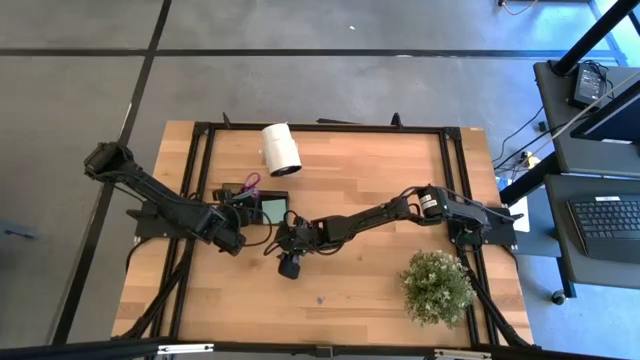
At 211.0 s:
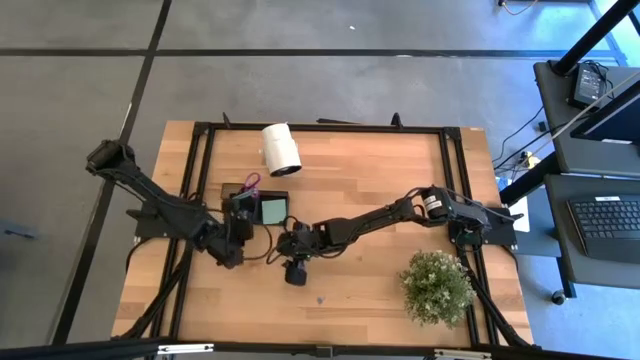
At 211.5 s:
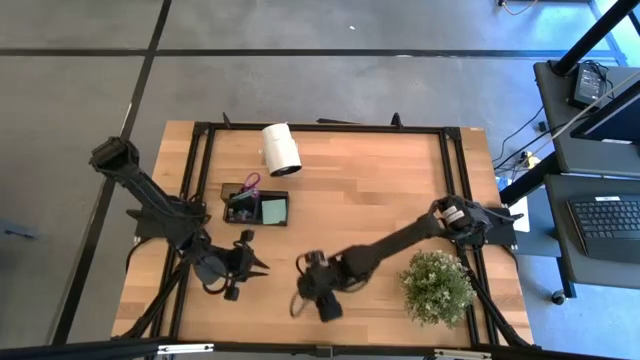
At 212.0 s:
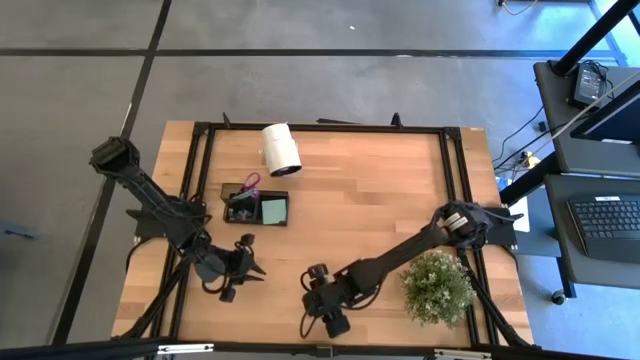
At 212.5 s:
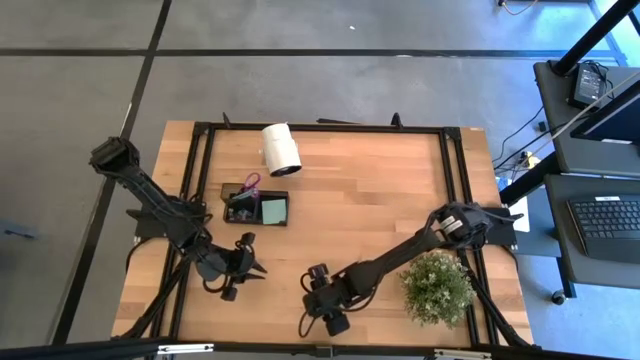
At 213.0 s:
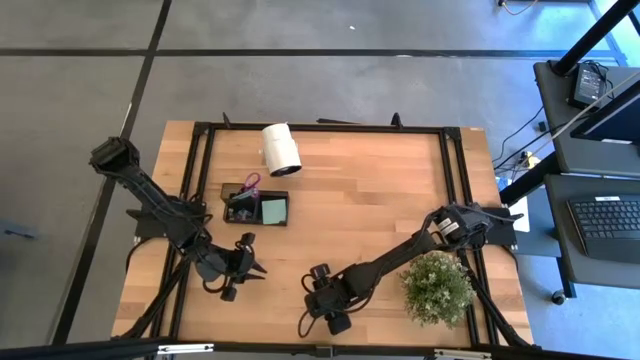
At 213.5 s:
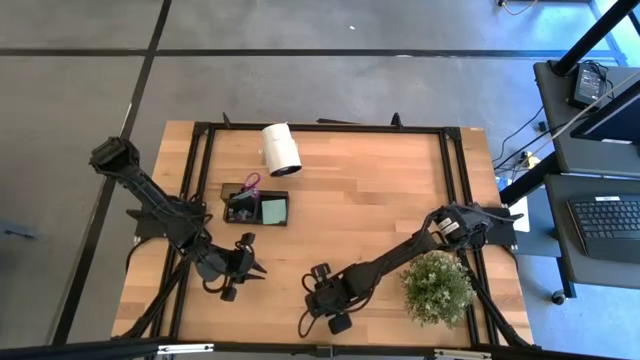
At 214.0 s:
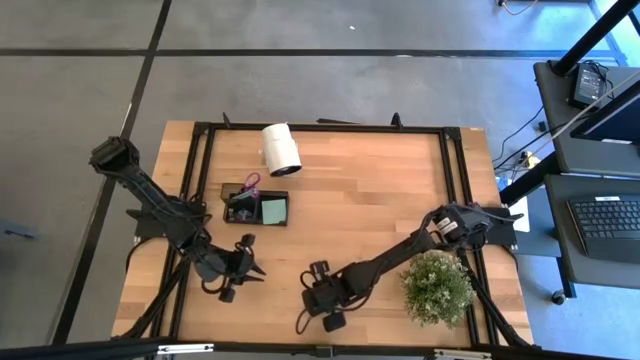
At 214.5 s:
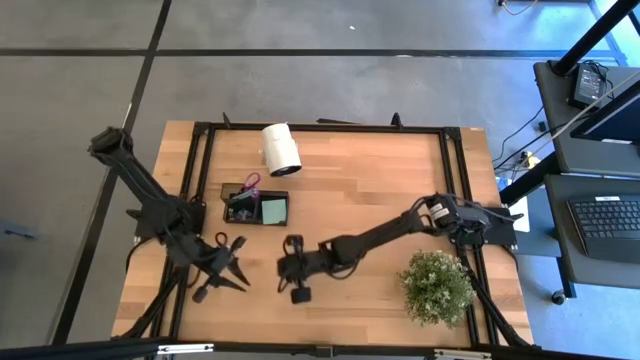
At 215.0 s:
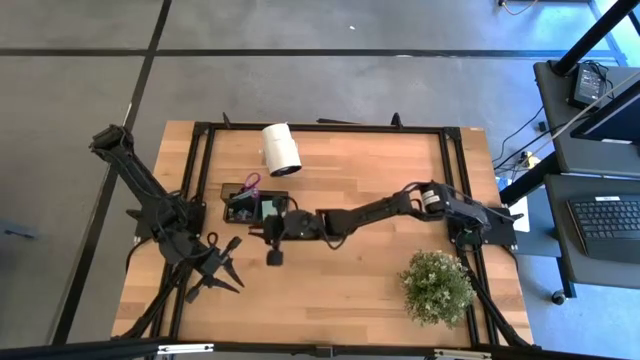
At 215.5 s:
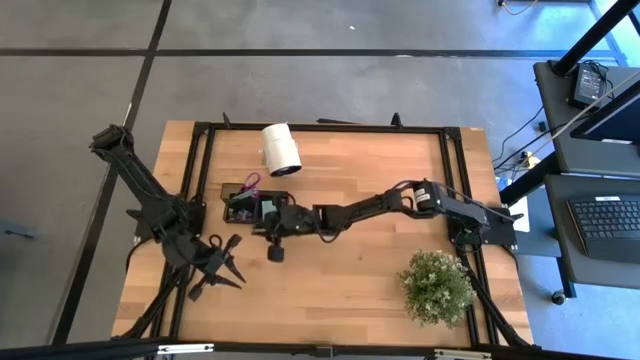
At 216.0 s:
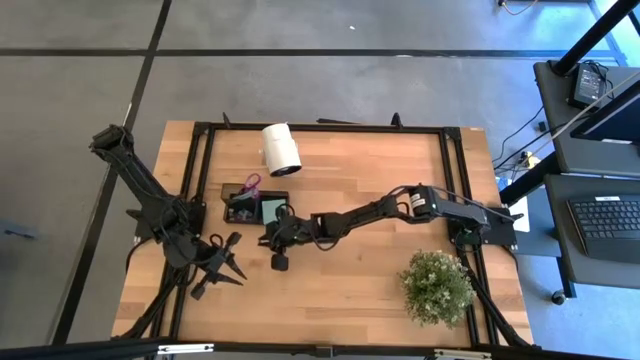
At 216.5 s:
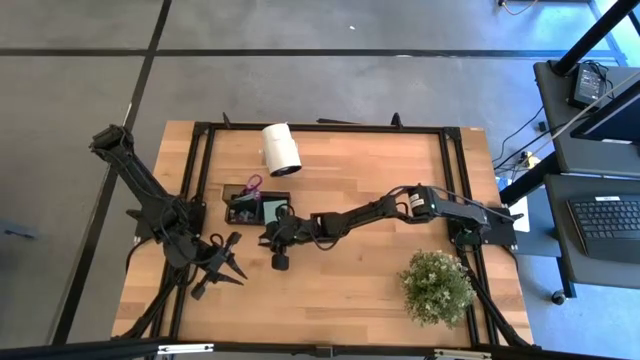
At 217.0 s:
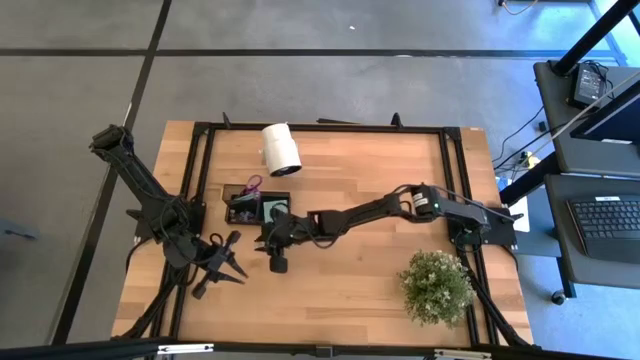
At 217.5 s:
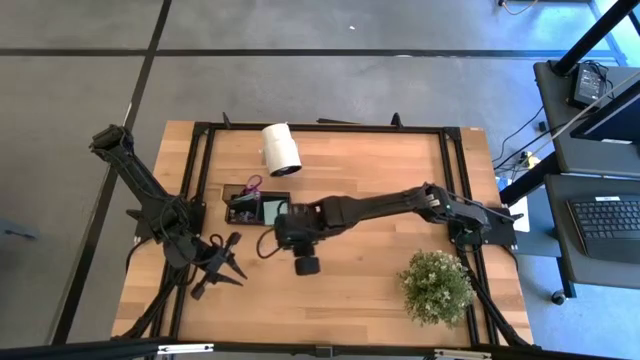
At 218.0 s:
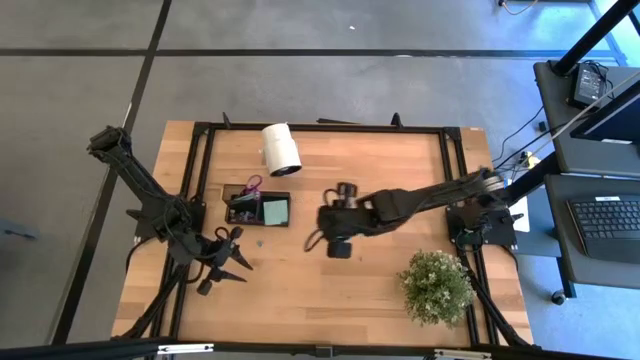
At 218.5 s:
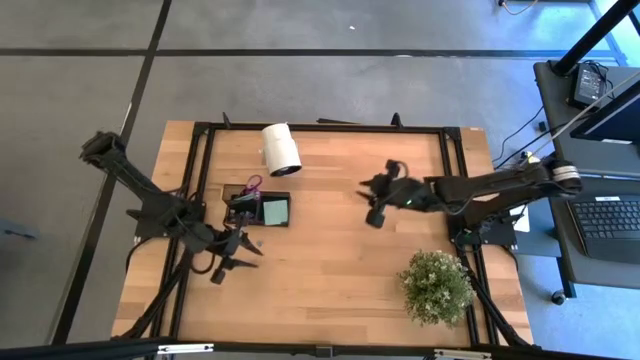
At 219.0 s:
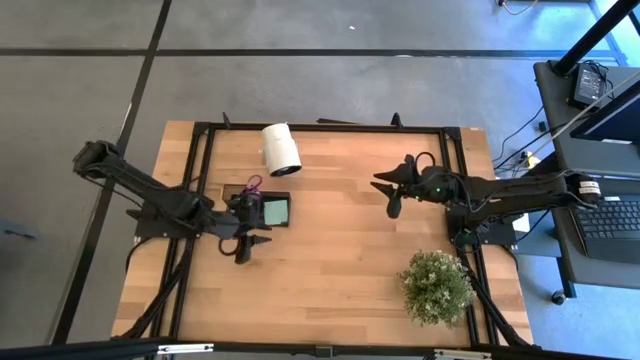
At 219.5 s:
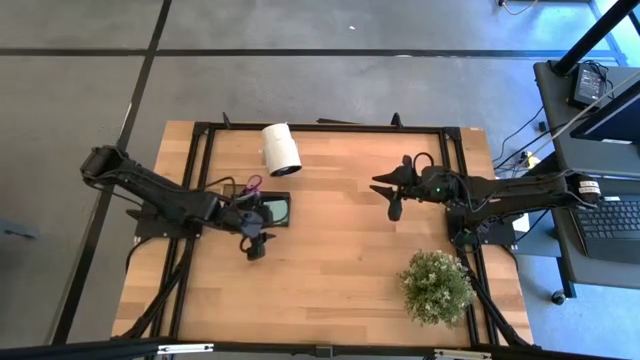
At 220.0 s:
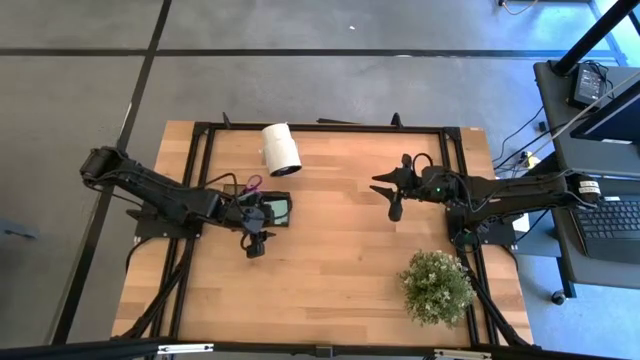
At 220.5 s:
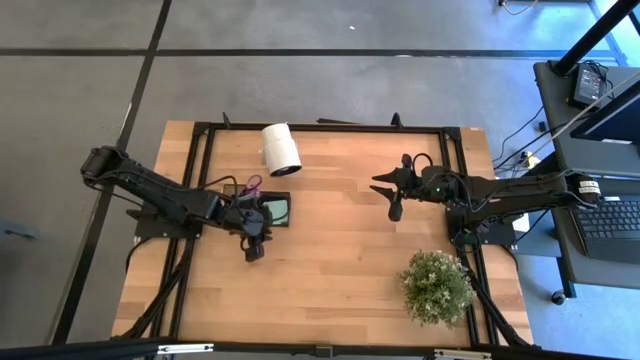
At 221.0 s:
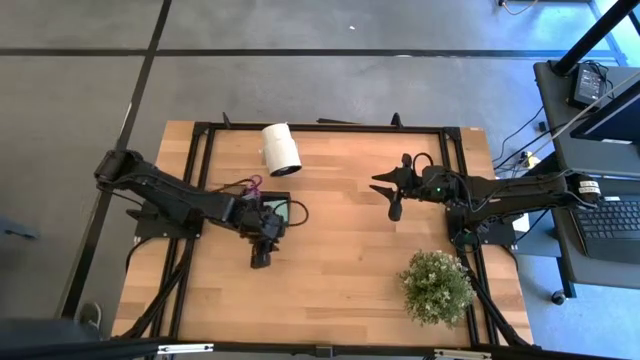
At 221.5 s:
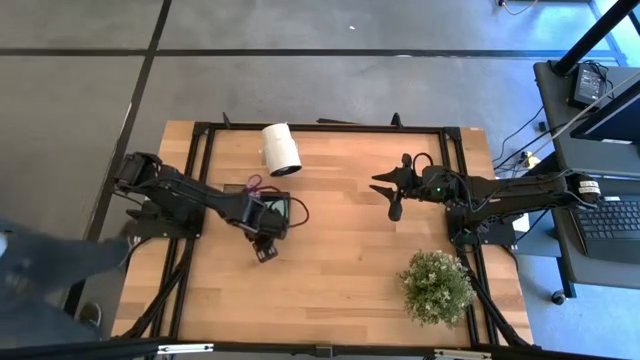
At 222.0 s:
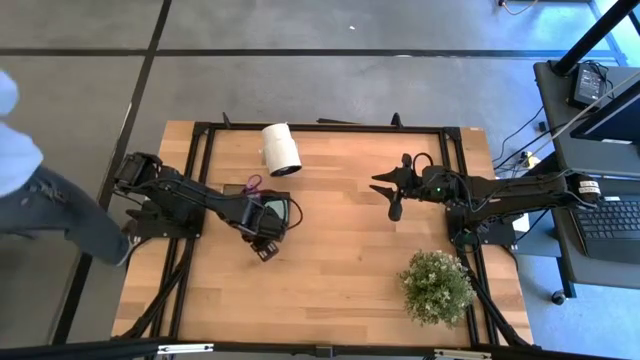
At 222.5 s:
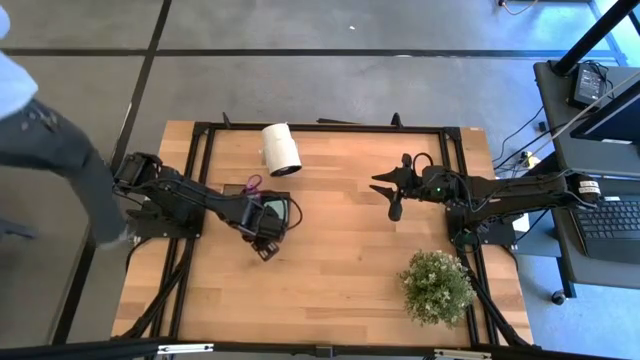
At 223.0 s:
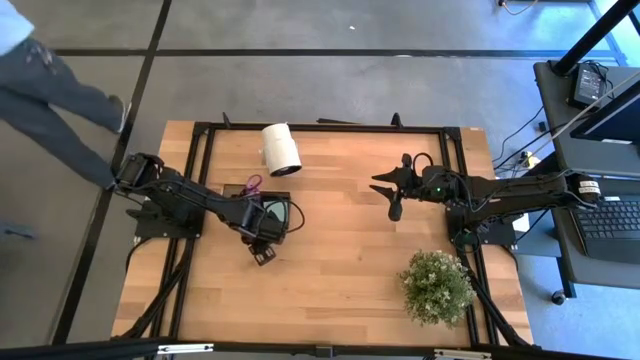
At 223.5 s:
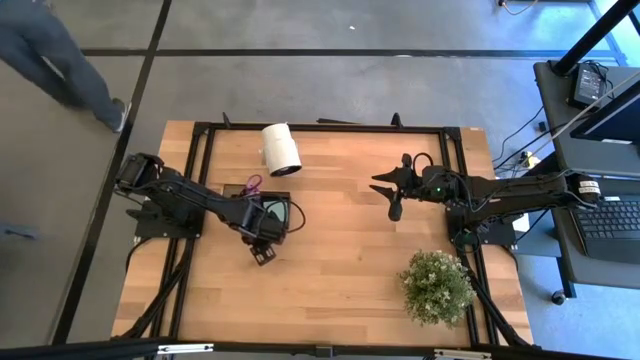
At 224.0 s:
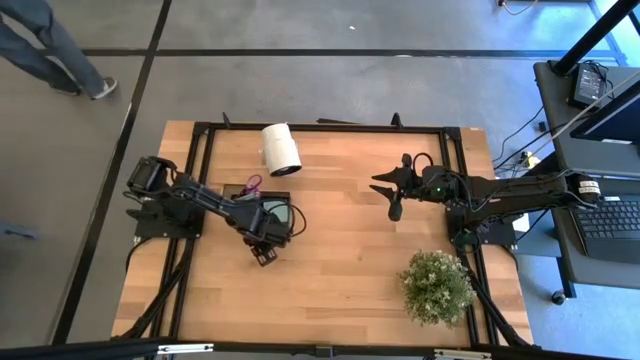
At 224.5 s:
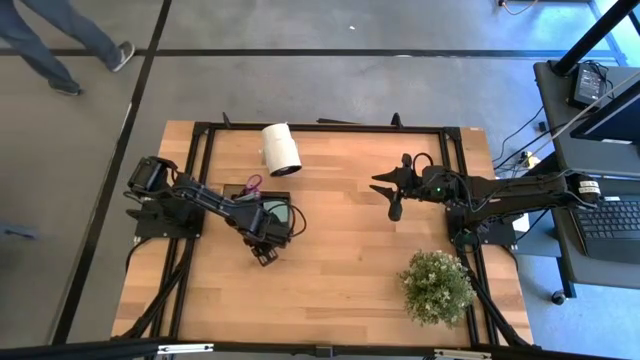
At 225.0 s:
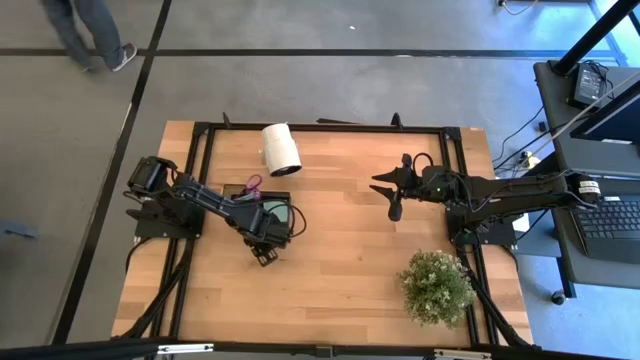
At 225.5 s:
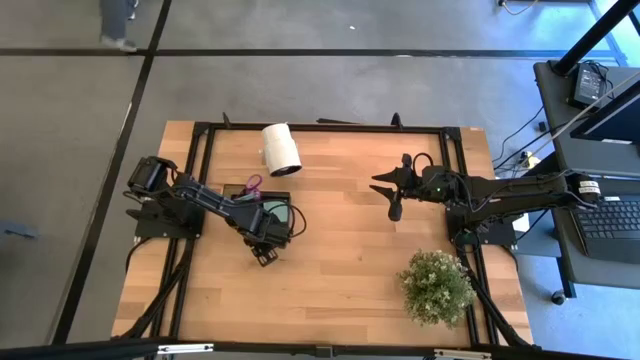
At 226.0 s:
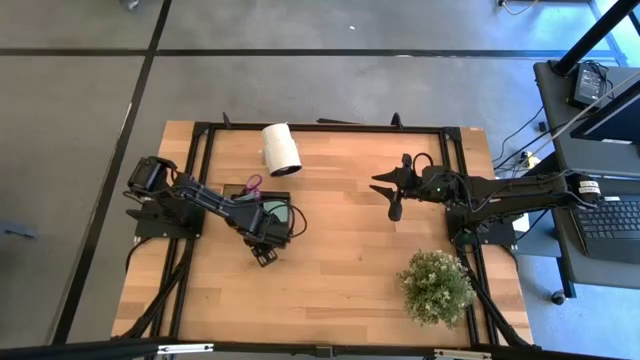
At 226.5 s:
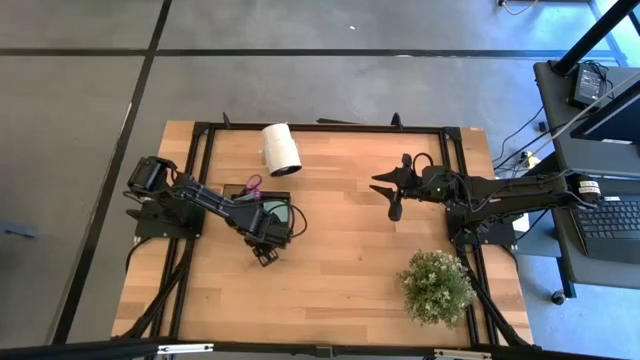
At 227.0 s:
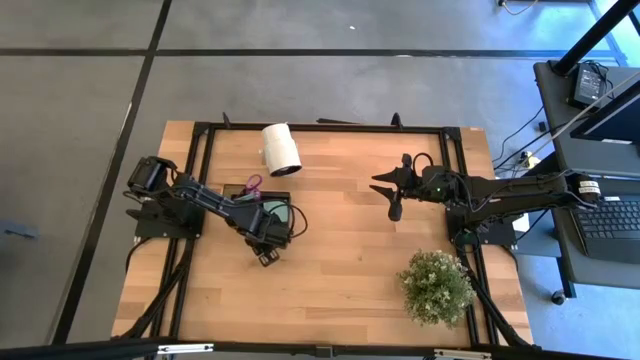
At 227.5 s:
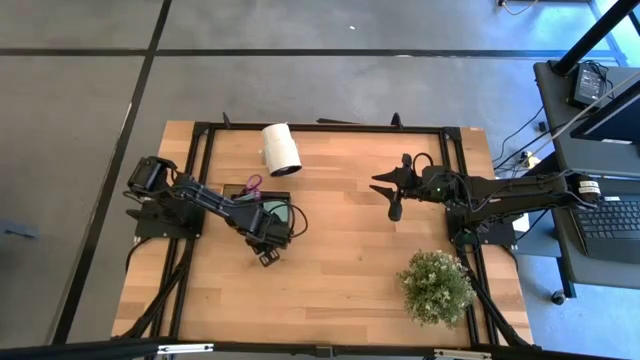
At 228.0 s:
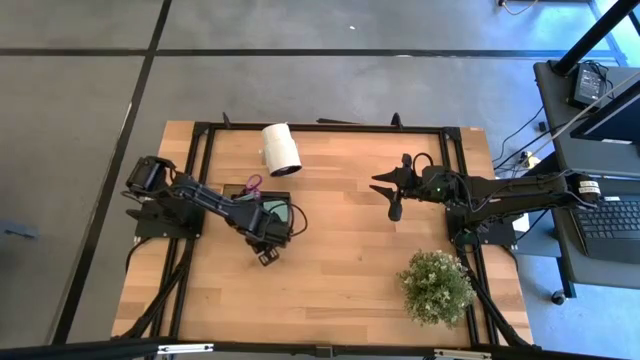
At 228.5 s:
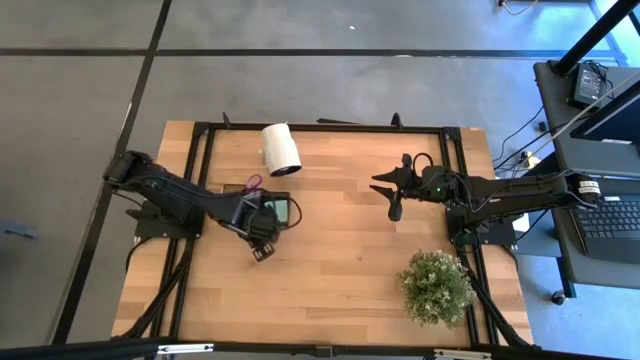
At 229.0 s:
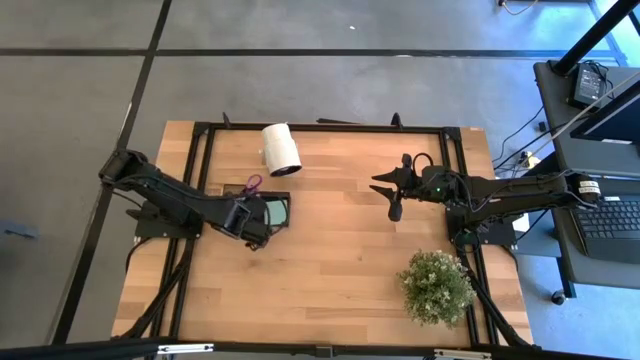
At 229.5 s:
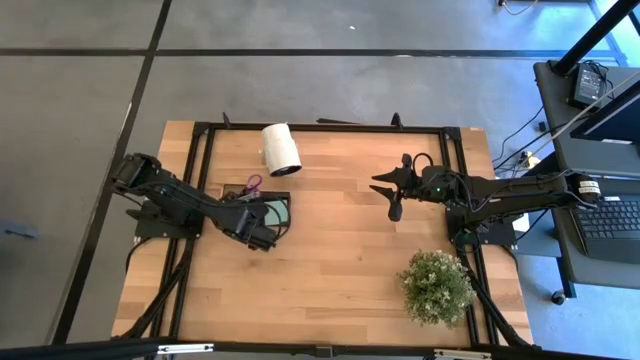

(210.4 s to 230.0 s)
Task: Pick and place office supplies into organizer
Put the blue binder clip into the black desk organizer

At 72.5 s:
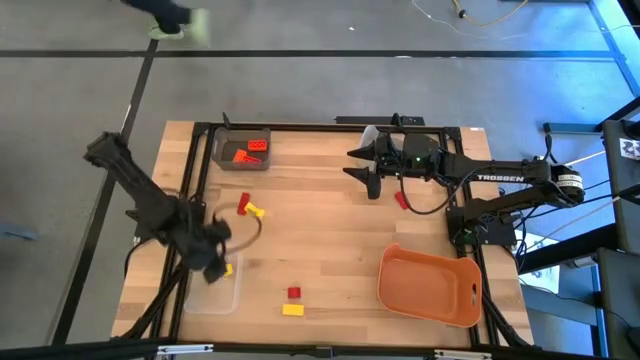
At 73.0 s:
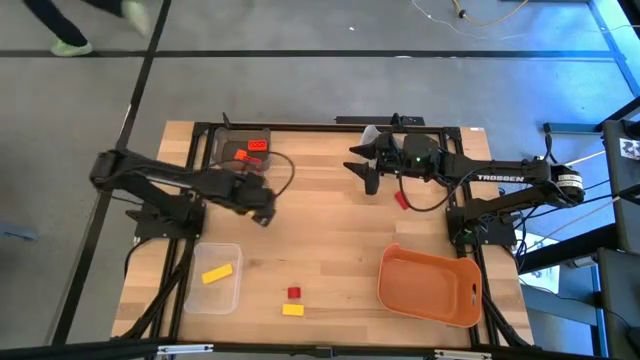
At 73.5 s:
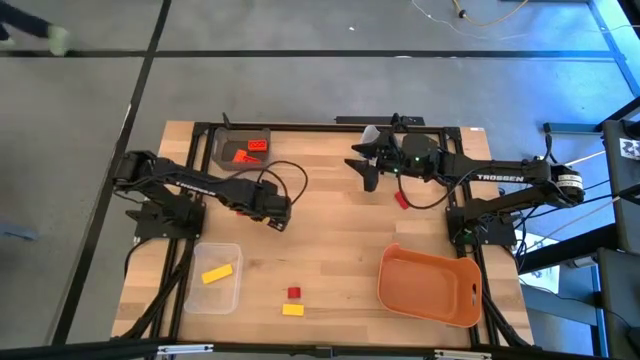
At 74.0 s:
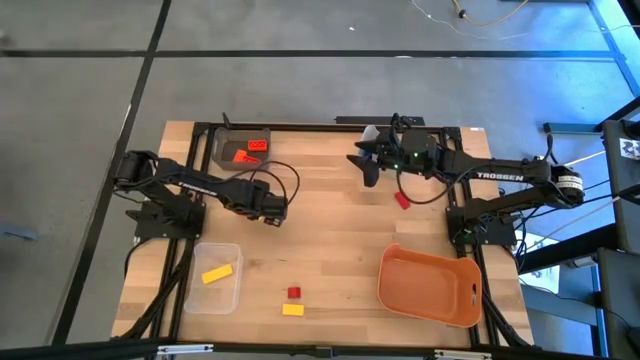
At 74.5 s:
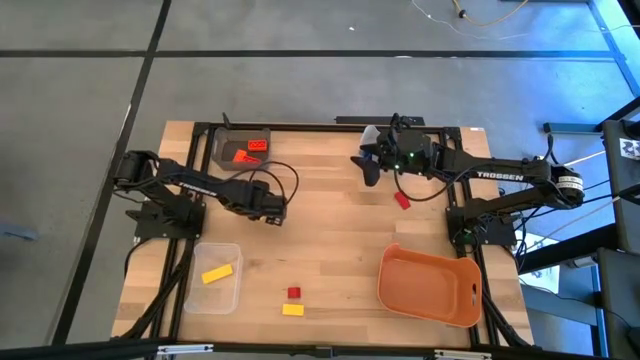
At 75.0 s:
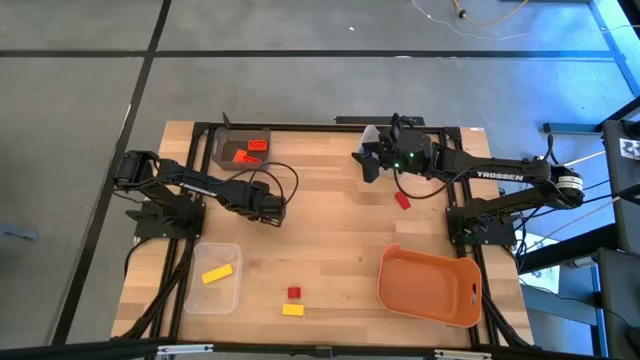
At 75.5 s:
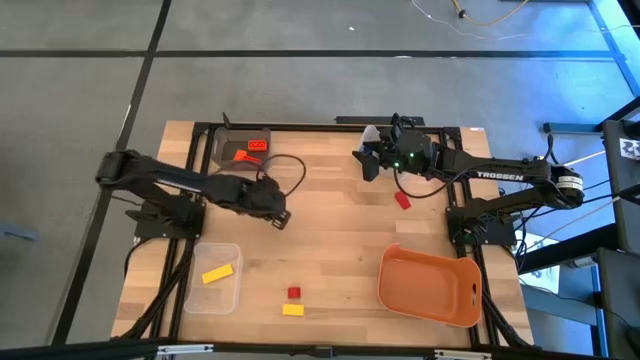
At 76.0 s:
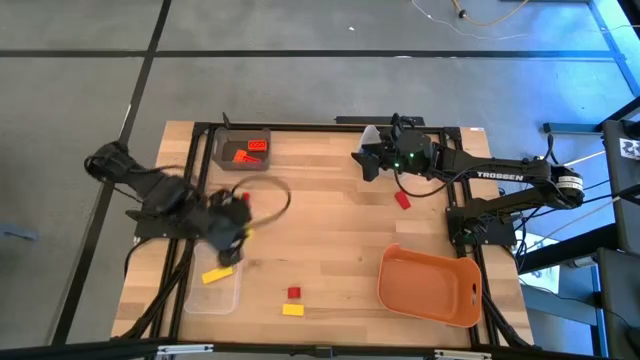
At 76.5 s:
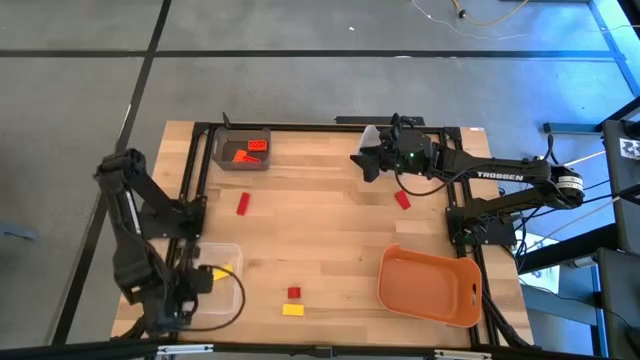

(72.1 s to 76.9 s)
Task: Sort & place blocks by color
Put the top yellow block into the transparent bin
